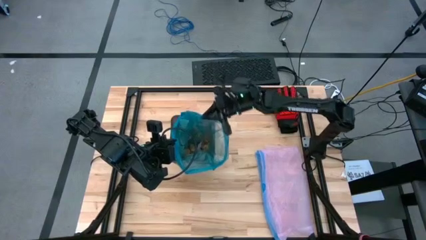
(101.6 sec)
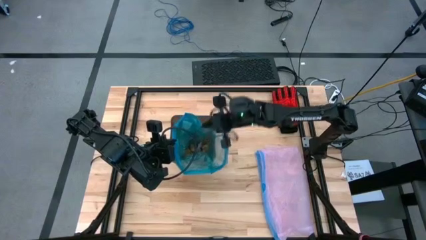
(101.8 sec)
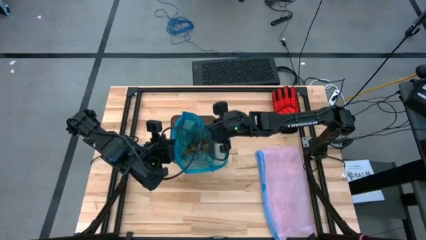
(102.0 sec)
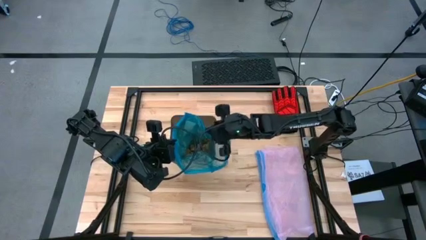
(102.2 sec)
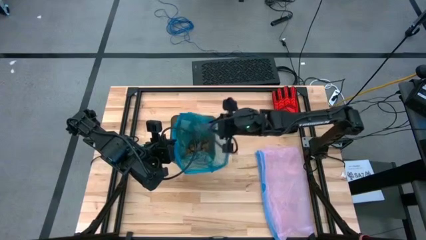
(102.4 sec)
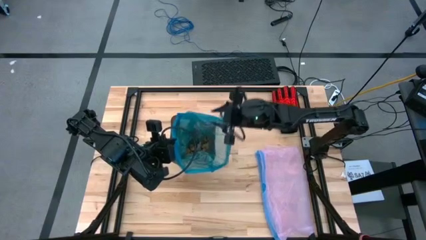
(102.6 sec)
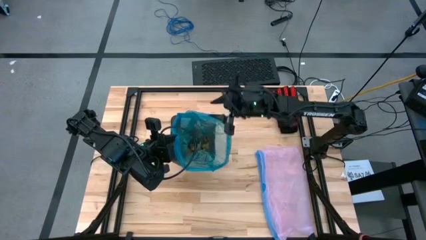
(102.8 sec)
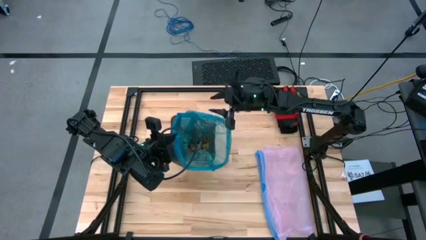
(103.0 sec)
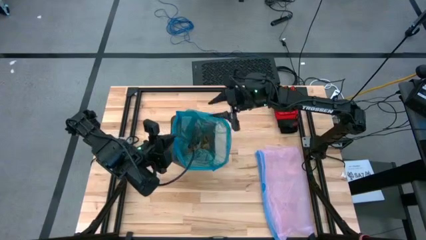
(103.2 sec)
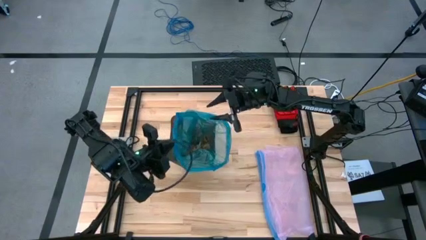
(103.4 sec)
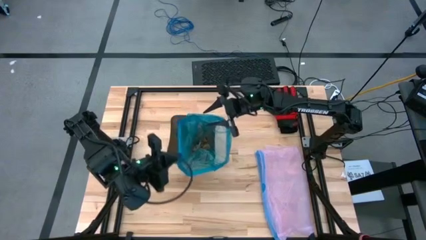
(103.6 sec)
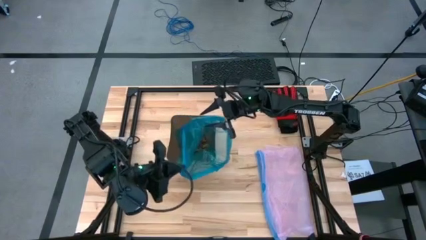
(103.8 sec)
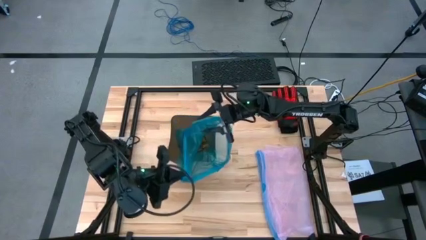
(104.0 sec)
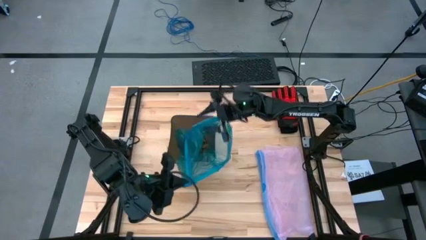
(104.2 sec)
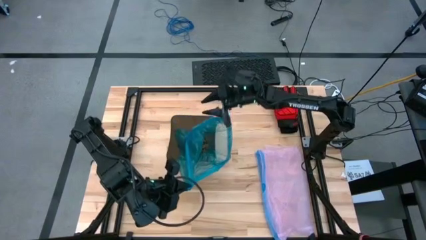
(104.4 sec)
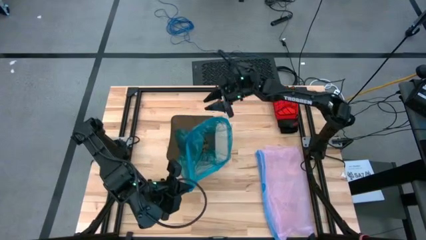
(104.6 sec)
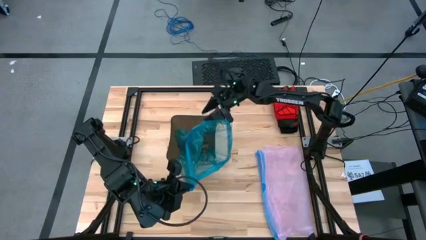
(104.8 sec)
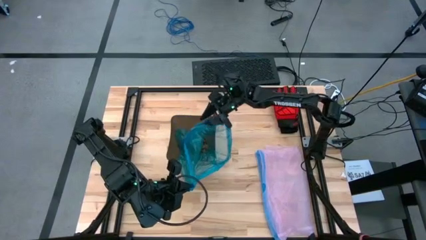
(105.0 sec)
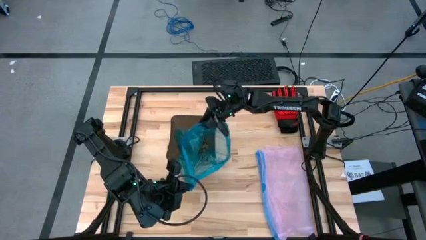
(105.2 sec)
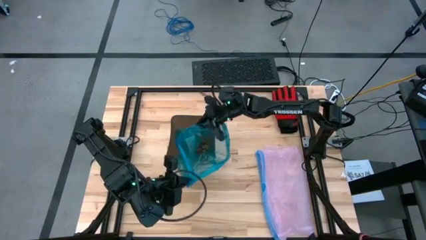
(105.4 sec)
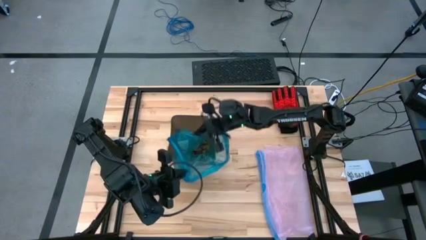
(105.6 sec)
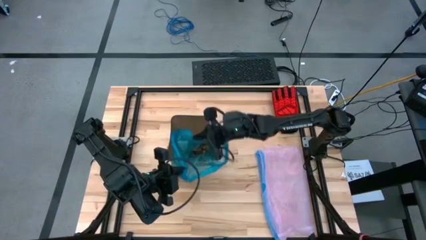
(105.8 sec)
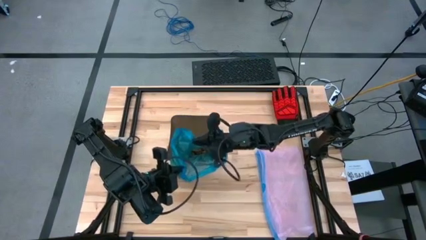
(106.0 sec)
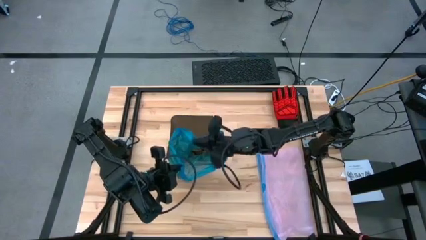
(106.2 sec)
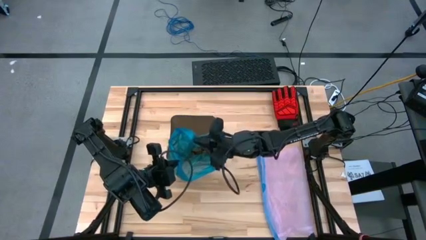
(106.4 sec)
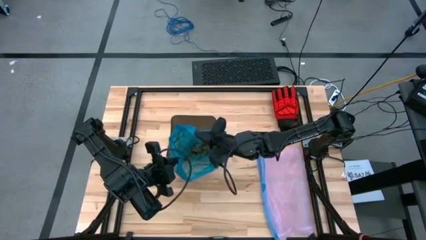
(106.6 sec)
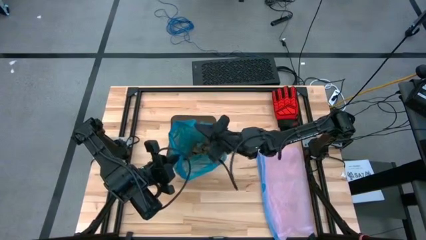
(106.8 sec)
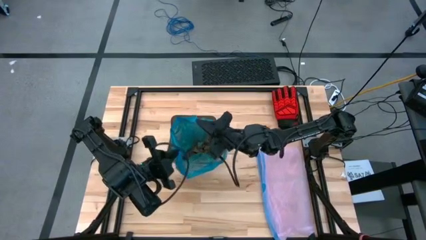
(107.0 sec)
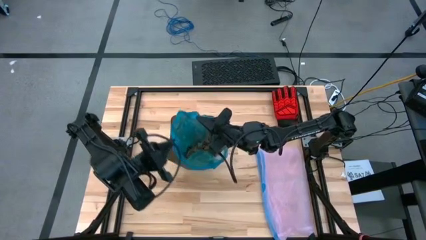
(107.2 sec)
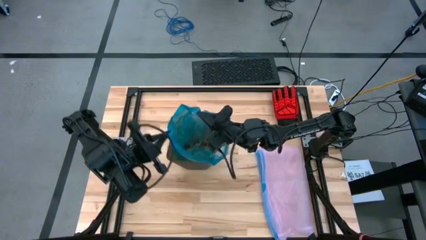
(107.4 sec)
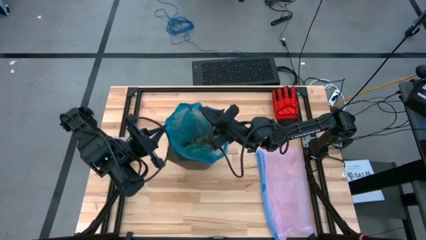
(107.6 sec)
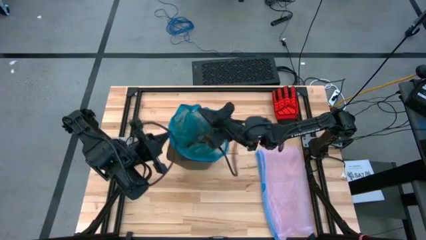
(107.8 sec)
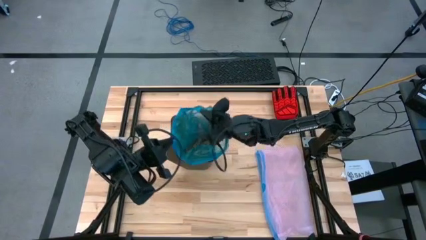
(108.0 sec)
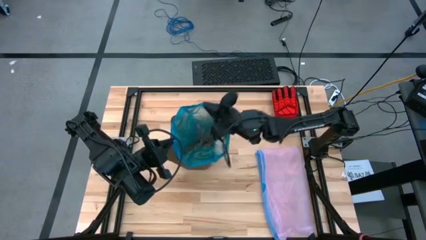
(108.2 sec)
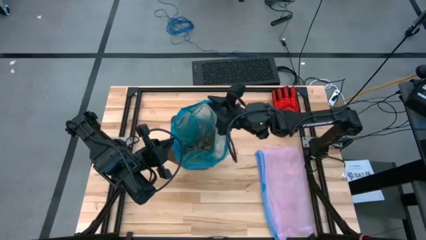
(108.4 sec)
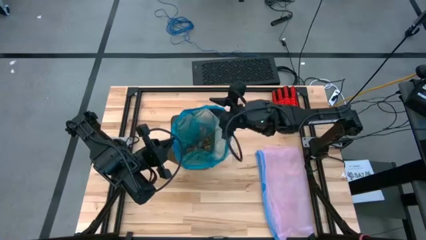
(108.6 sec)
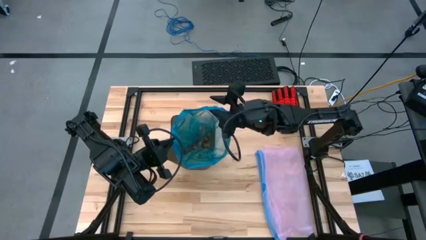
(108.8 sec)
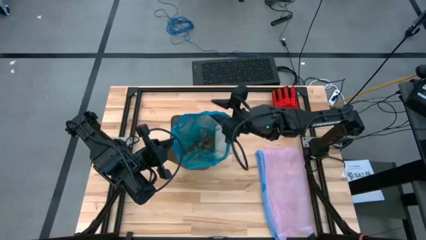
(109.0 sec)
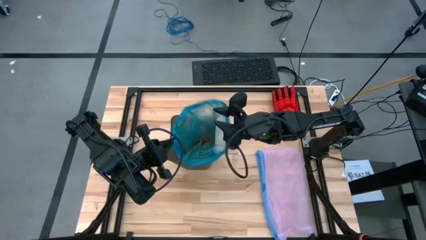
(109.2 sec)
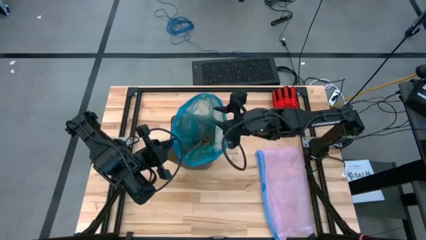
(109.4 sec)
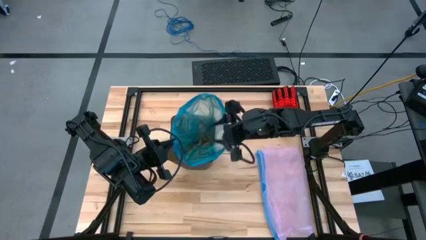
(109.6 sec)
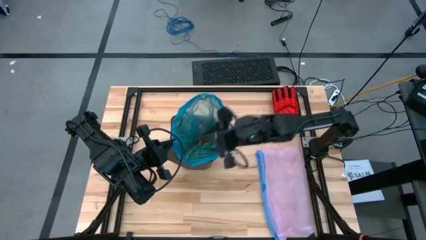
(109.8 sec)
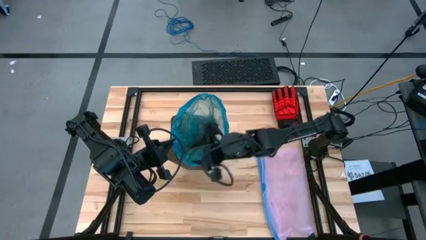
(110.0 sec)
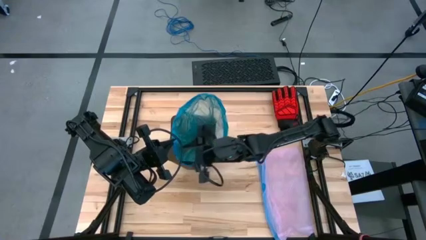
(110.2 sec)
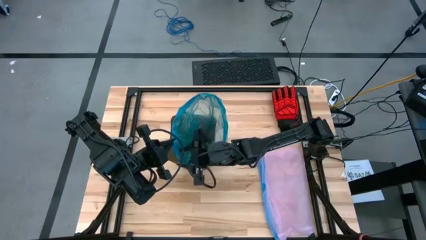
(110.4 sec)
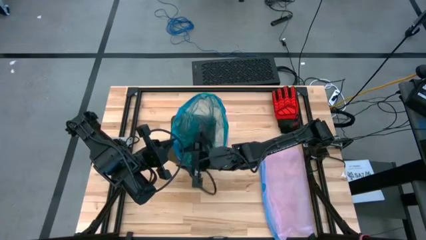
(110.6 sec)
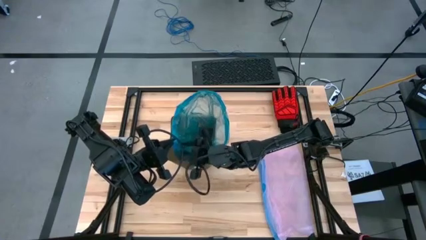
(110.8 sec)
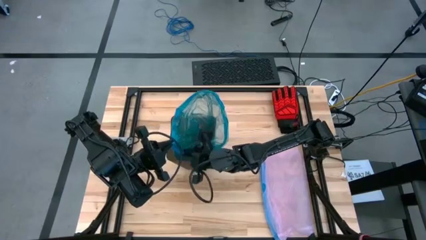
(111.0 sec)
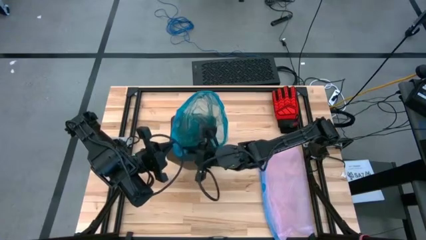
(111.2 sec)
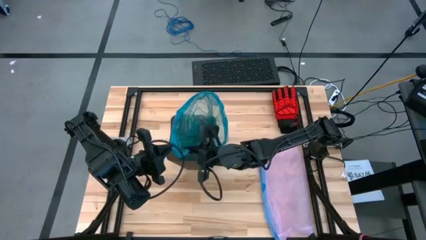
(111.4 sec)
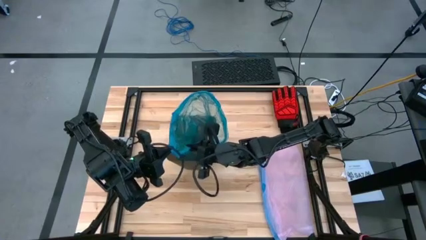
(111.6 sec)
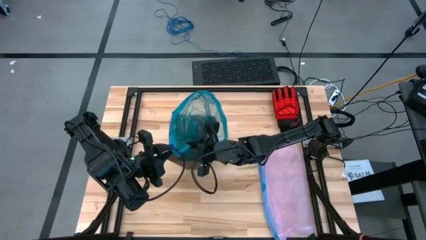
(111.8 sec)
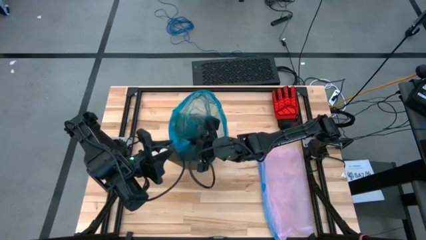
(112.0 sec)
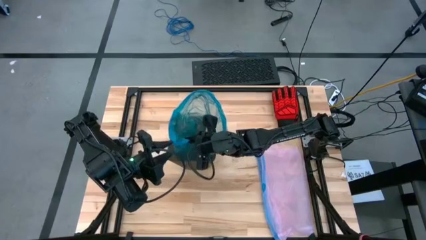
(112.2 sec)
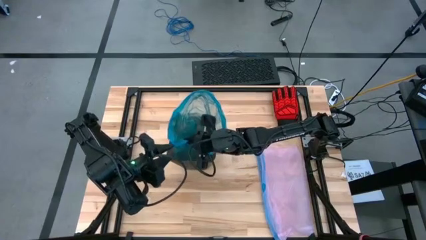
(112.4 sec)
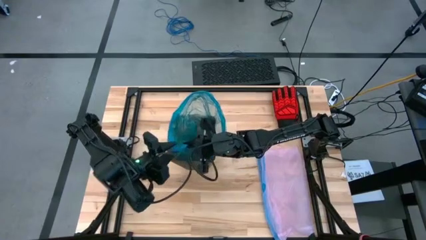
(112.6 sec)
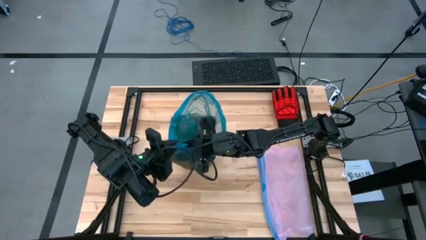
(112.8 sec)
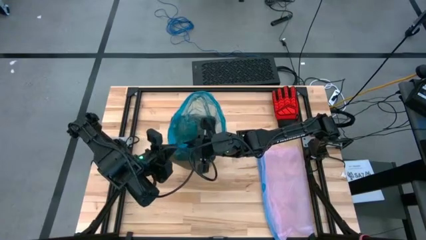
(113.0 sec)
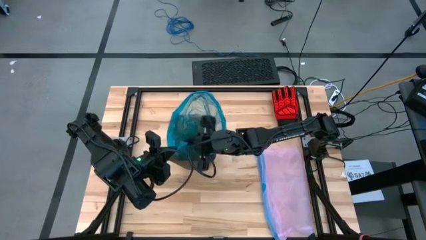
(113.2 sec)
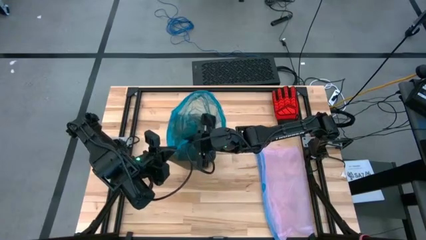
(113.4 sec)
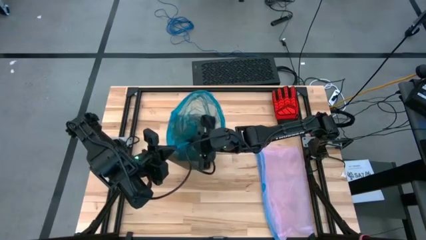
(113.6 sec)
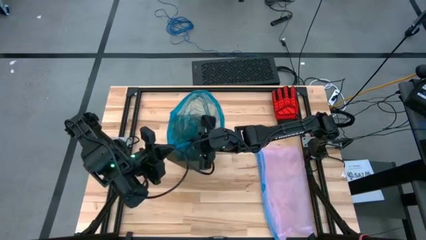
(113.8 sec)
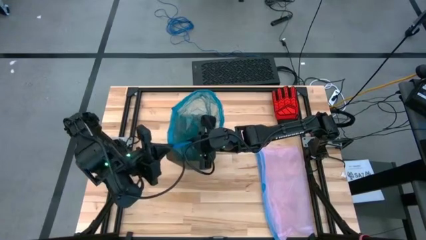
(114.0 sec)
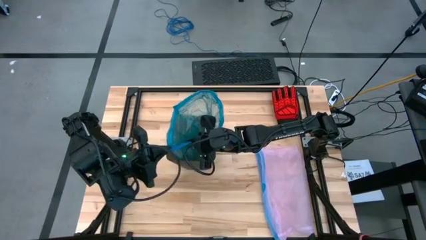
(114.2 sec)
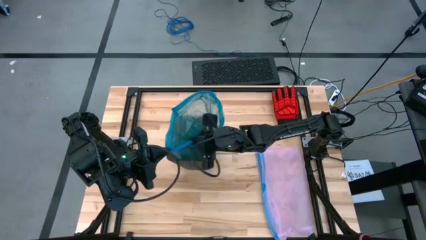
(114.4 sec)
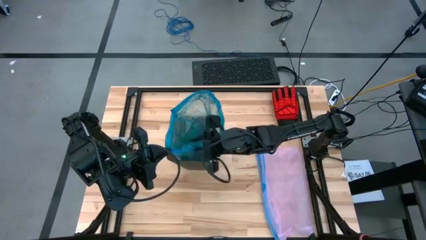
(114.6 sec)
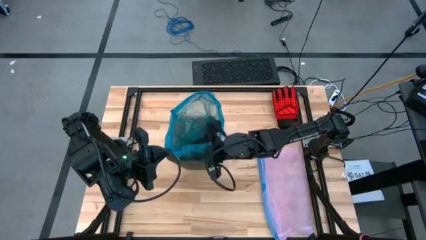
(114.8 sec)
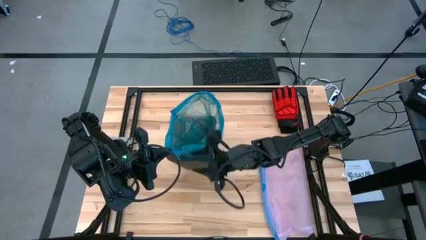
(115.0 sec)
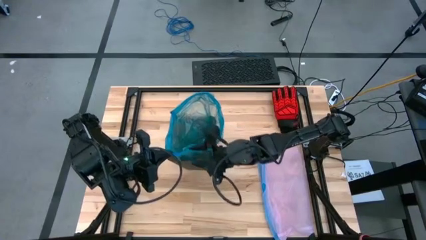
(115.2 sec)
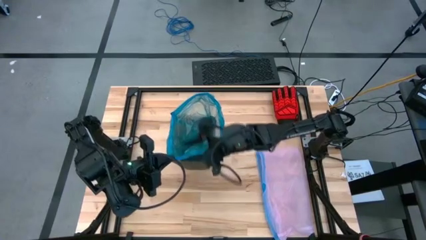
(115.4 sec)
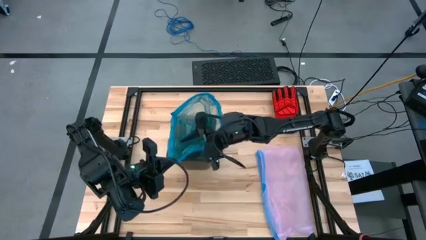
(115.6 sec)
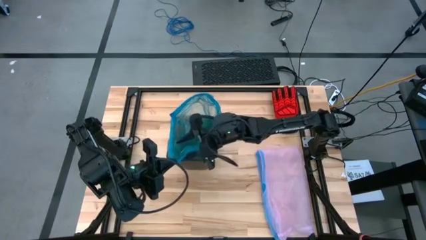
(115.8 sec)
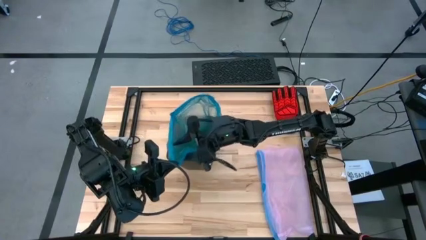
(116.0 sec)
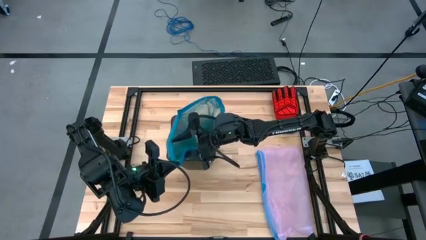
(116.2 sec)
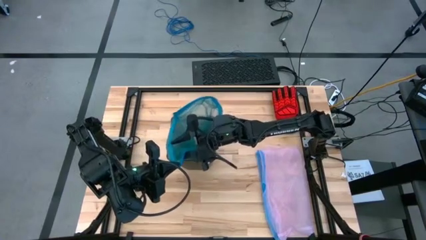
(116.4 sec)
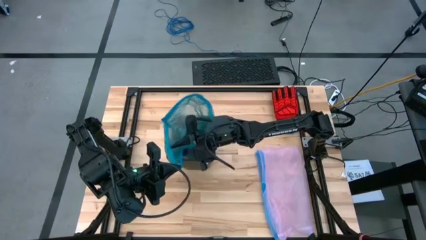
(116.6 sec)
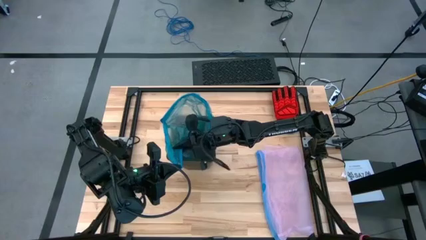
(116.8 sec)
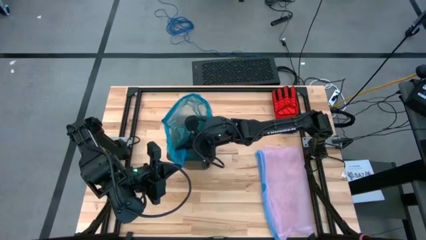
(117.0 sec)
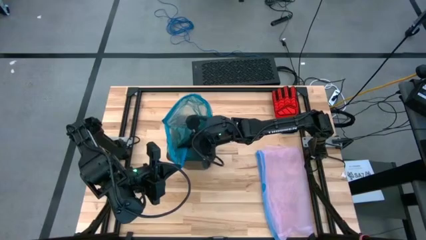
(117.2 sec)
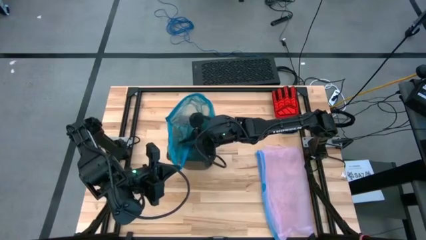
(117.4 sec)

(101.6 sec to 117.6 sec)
Task: place trash/remove bag and relplace
Close the blue trash bag

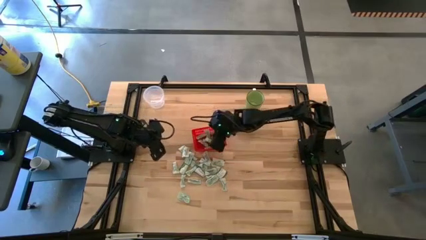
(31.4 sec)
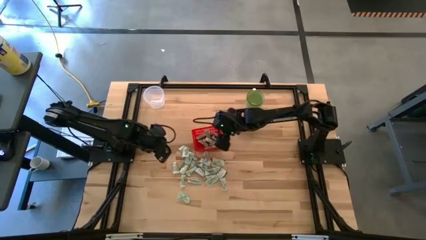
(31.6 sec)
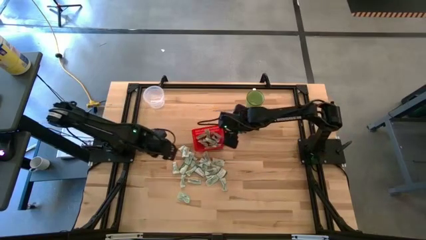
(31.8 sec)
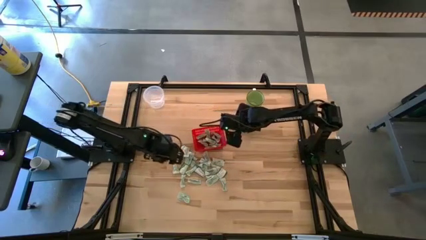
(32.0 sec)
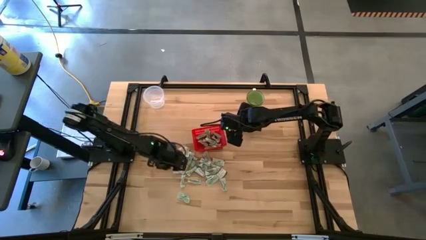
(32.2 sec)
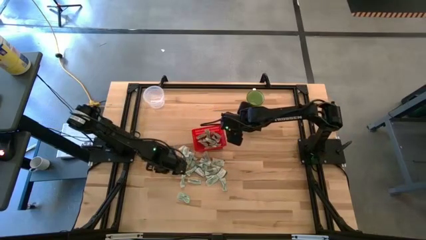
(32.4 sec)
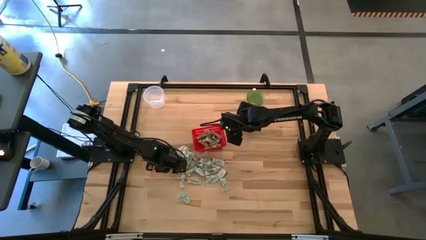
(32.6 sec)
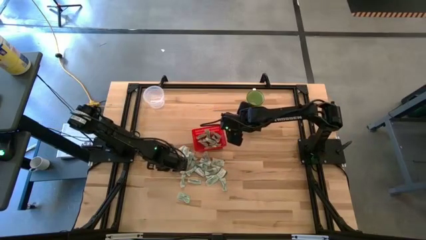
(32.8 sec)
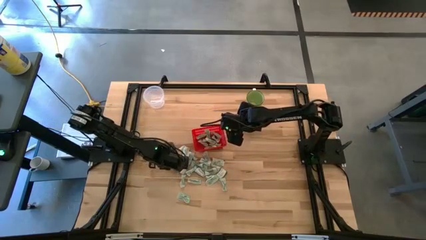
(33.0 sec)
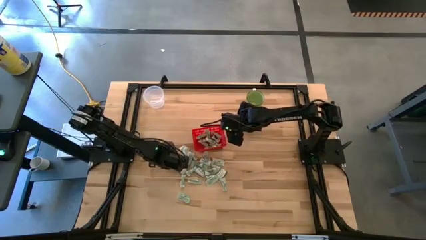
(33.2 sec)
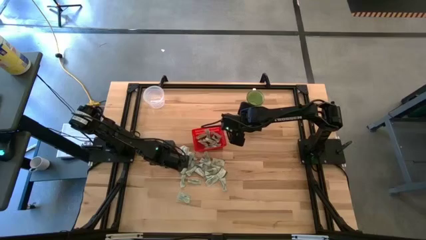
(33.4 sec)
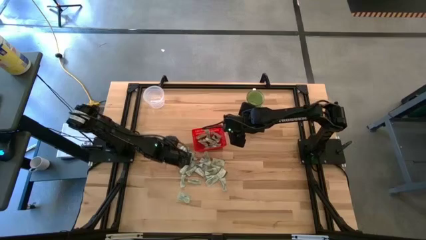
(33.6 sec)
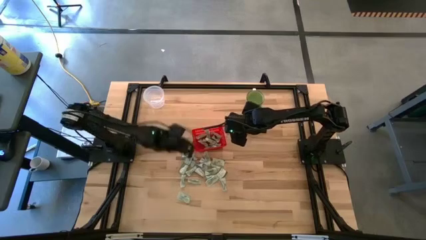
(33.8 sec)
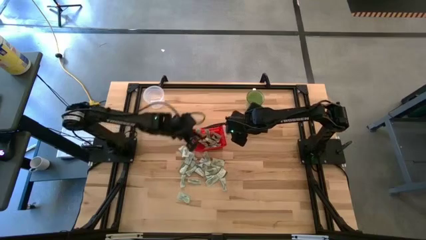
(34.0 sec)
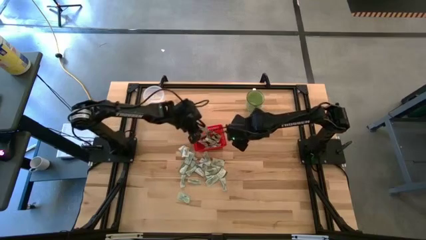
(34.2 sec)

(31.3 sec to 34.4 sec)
Task: Pick and place Stevia / Truvia into bins
Put the stevia packet into the red basket
